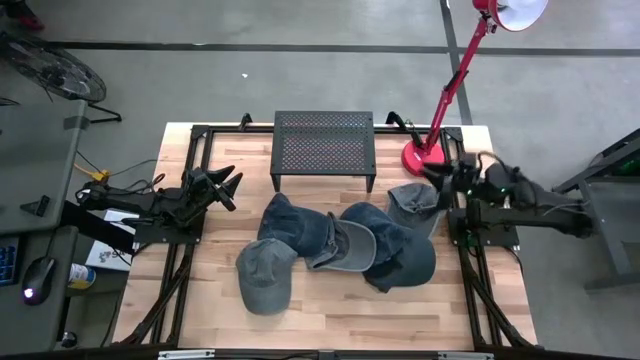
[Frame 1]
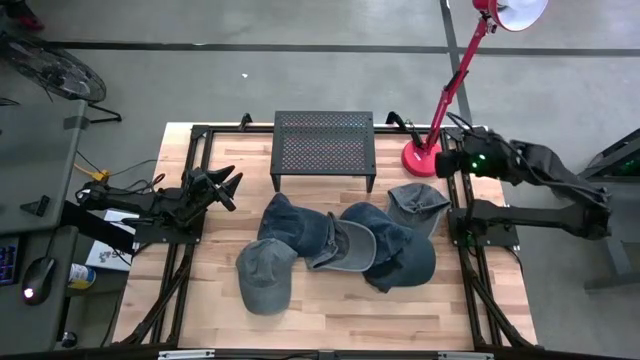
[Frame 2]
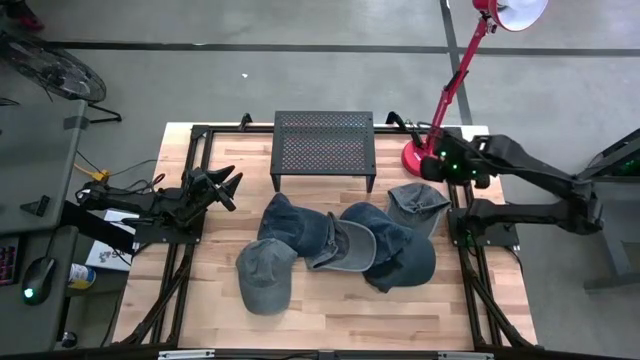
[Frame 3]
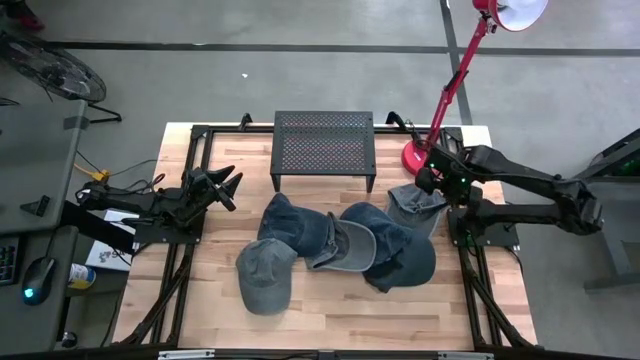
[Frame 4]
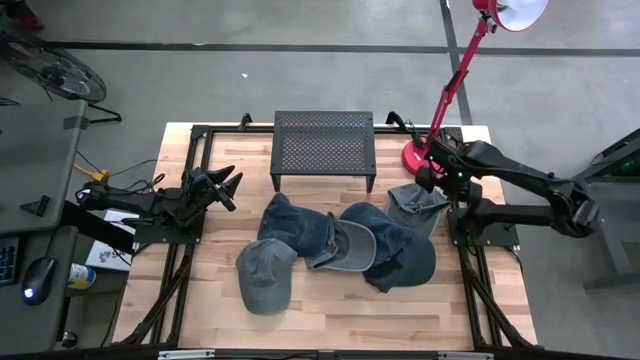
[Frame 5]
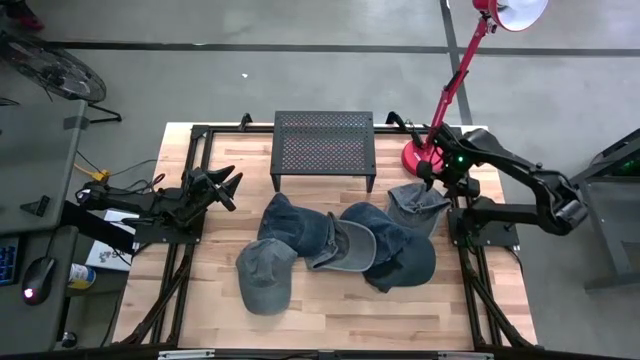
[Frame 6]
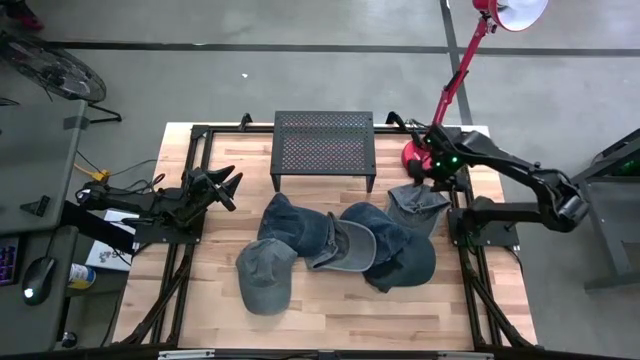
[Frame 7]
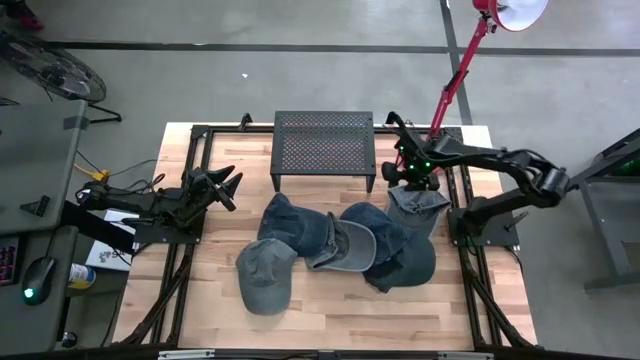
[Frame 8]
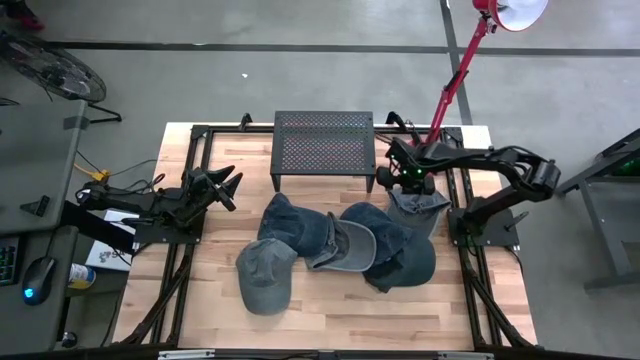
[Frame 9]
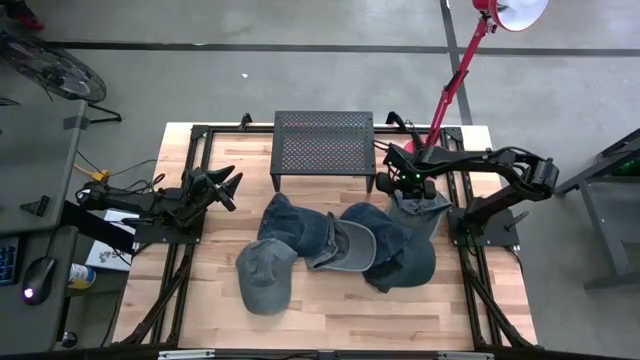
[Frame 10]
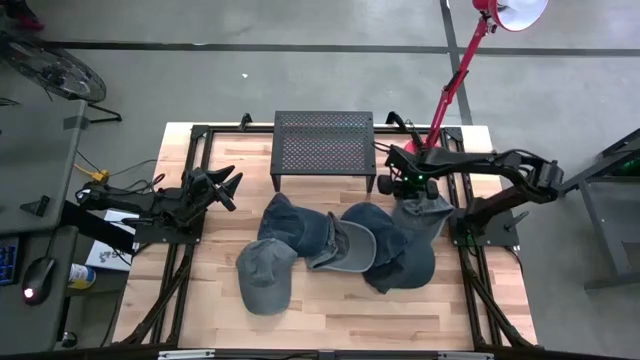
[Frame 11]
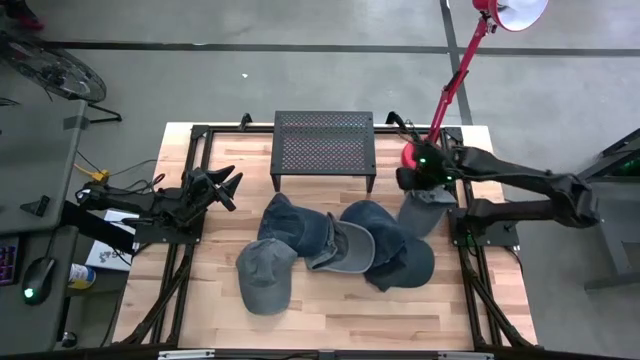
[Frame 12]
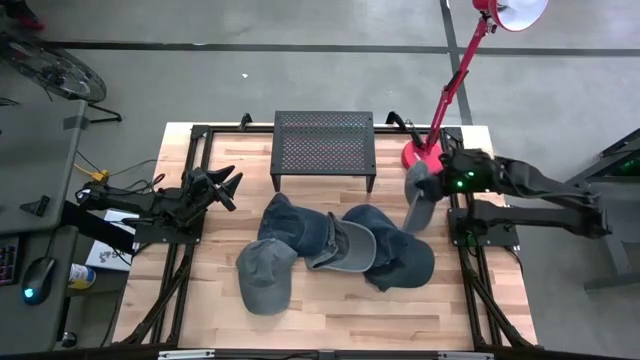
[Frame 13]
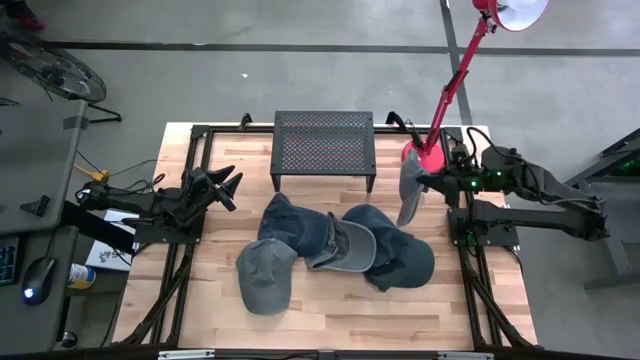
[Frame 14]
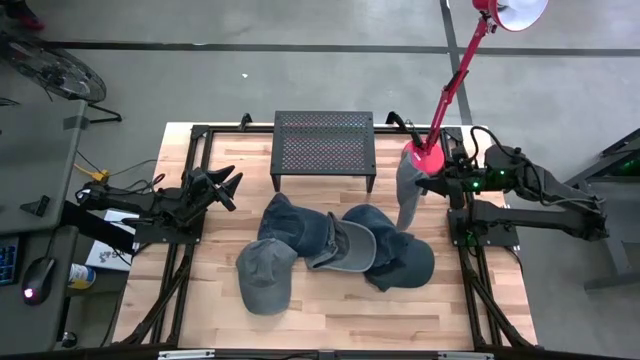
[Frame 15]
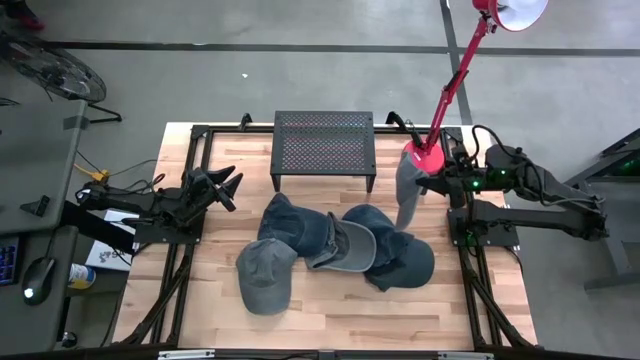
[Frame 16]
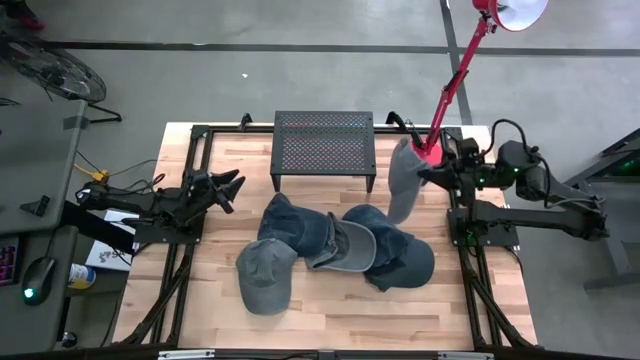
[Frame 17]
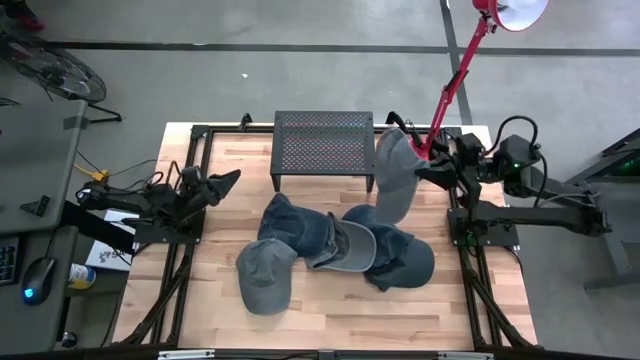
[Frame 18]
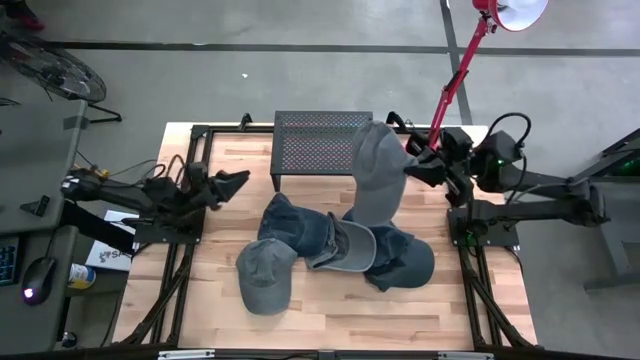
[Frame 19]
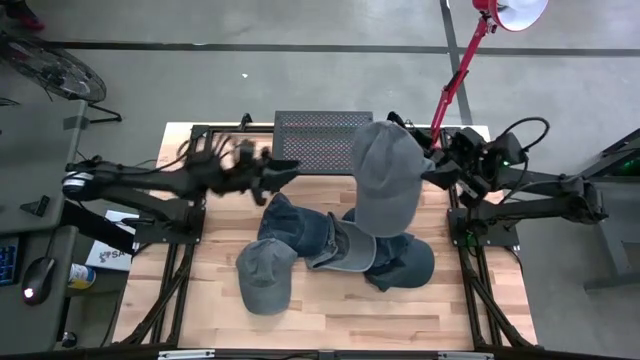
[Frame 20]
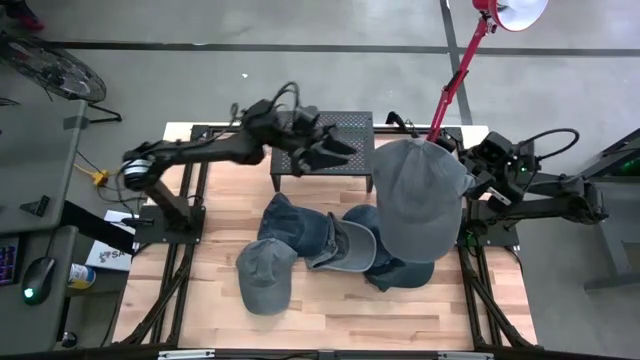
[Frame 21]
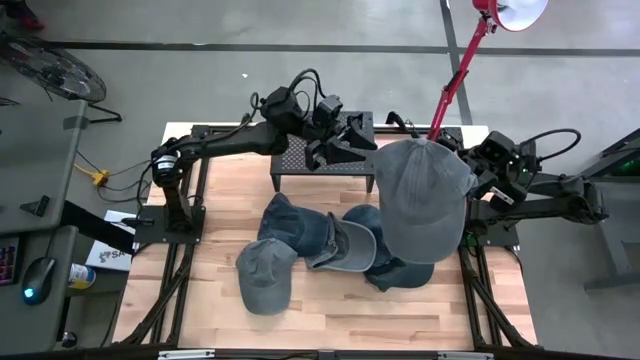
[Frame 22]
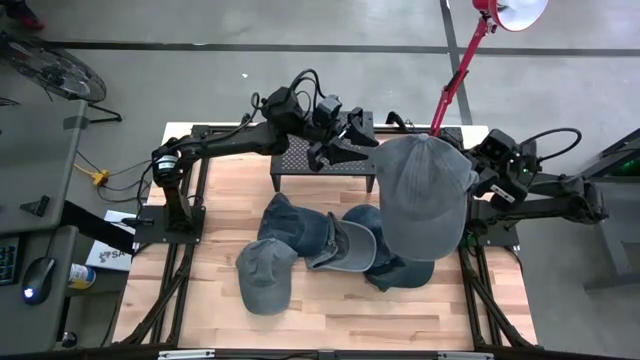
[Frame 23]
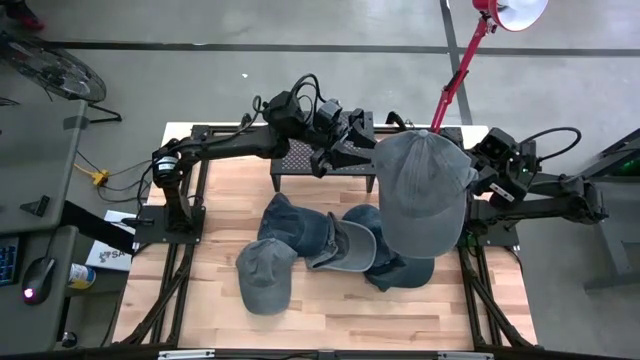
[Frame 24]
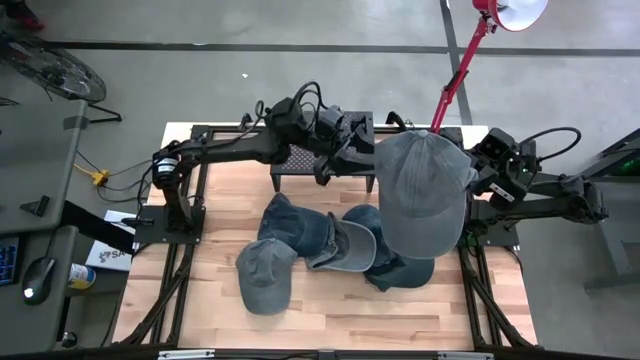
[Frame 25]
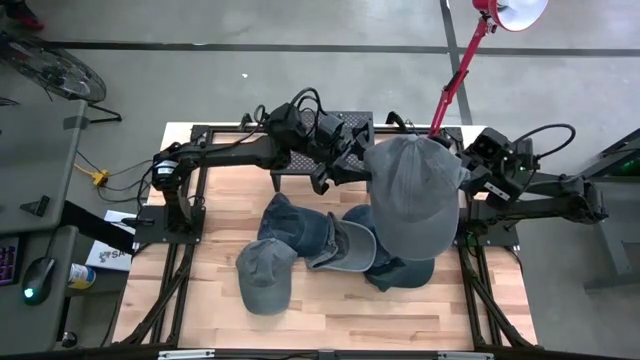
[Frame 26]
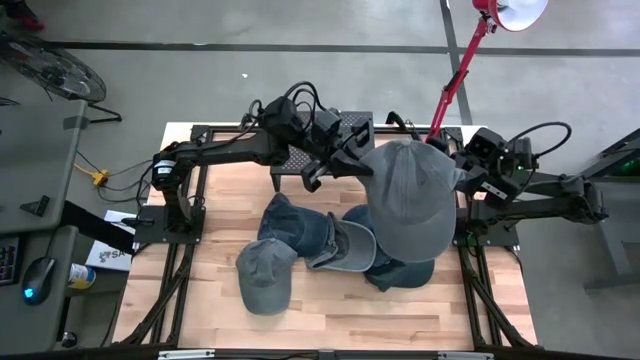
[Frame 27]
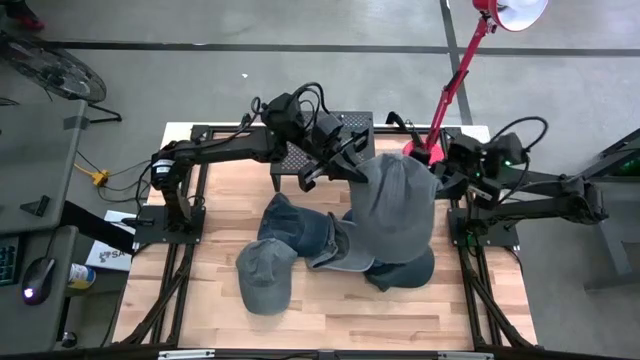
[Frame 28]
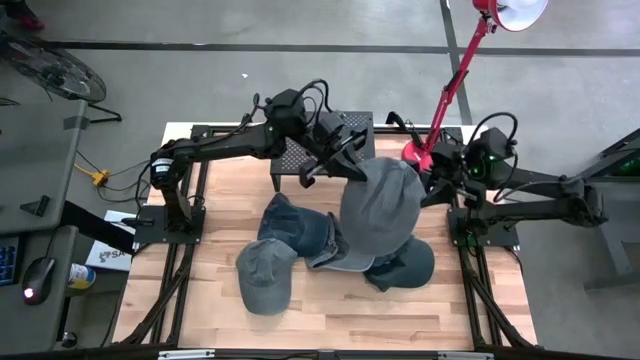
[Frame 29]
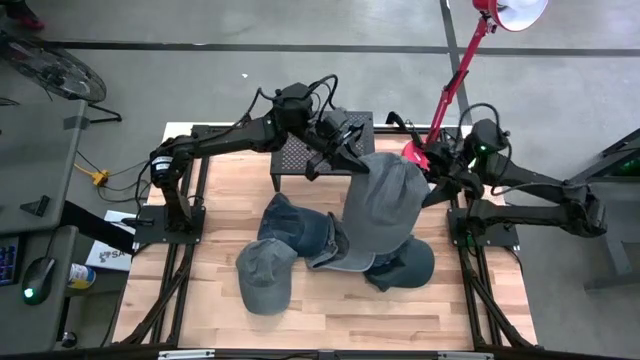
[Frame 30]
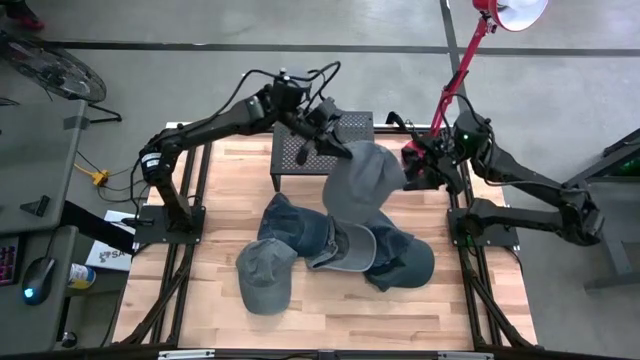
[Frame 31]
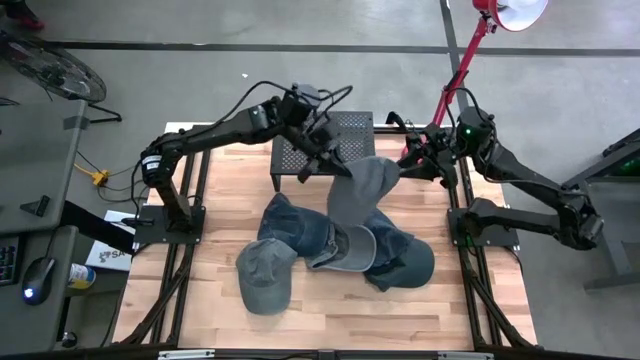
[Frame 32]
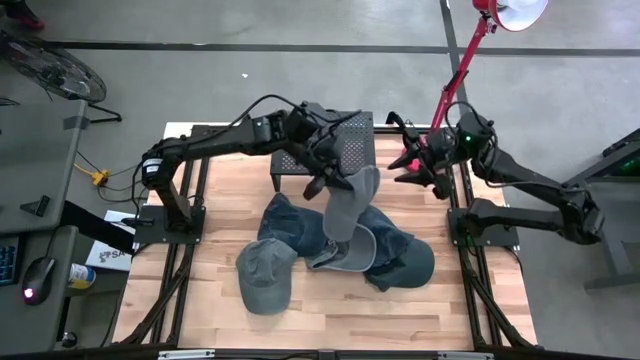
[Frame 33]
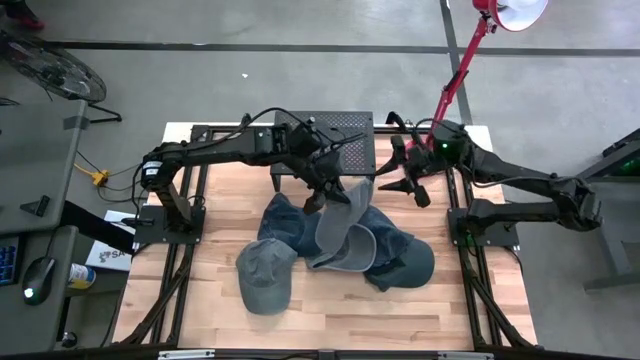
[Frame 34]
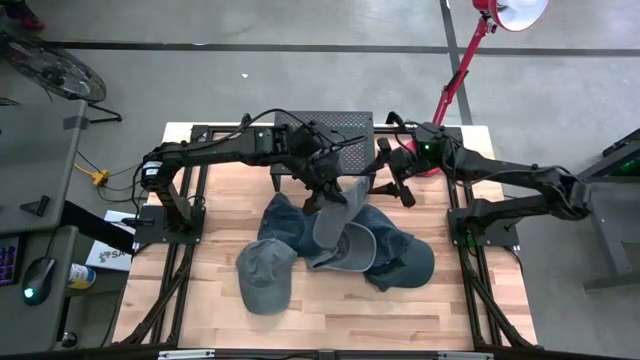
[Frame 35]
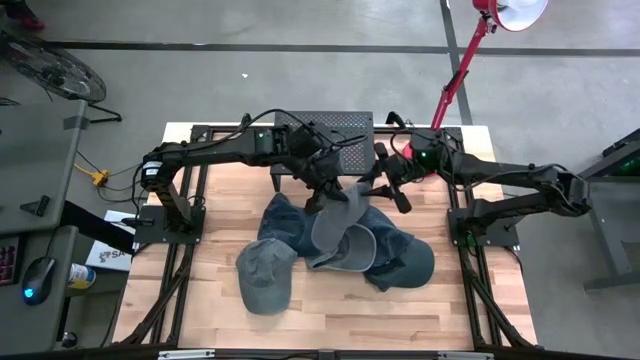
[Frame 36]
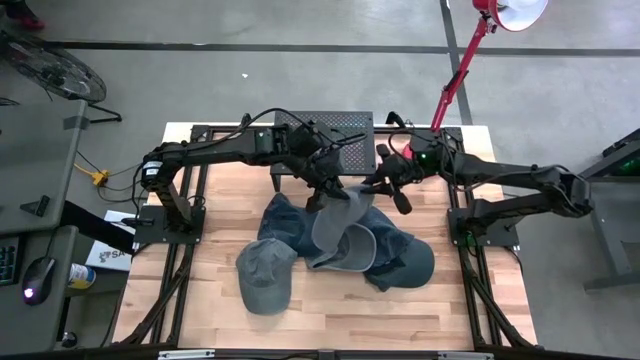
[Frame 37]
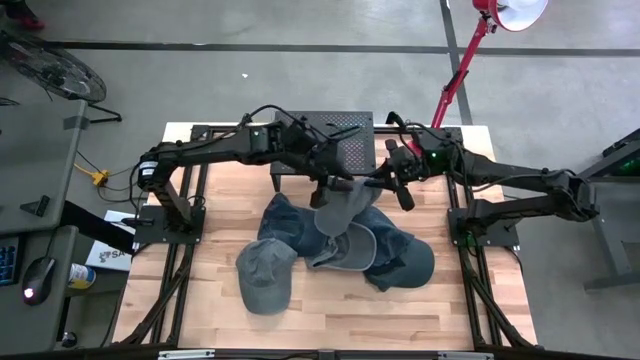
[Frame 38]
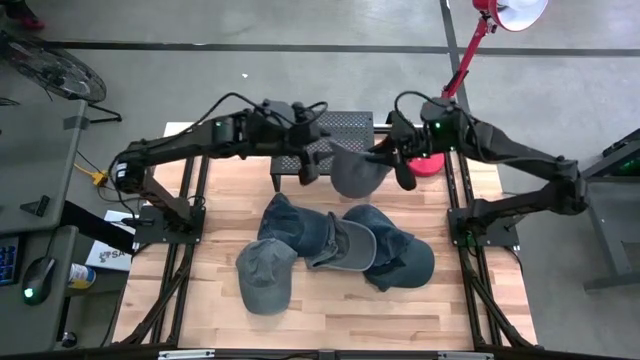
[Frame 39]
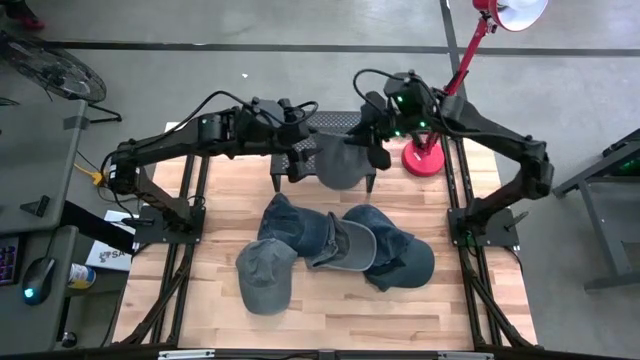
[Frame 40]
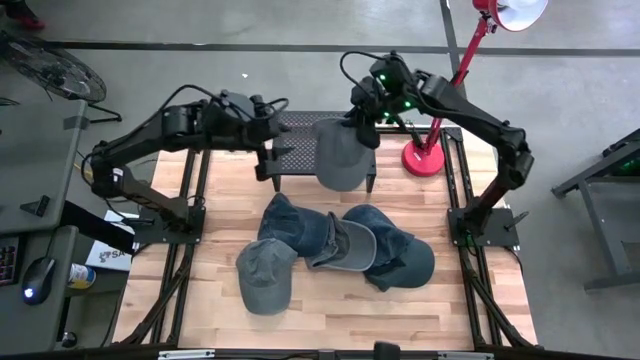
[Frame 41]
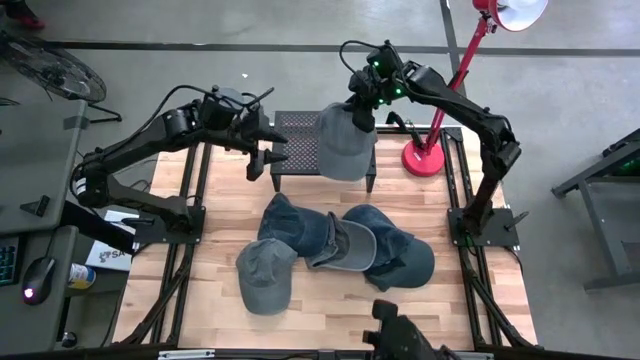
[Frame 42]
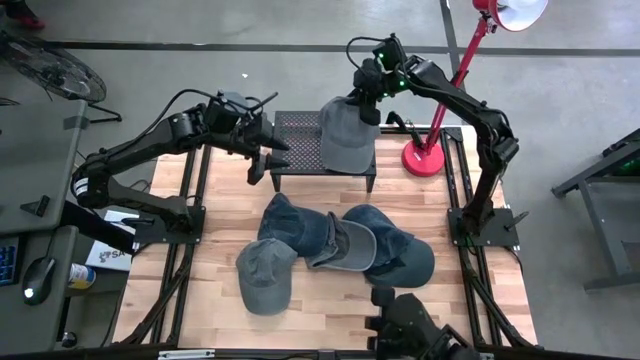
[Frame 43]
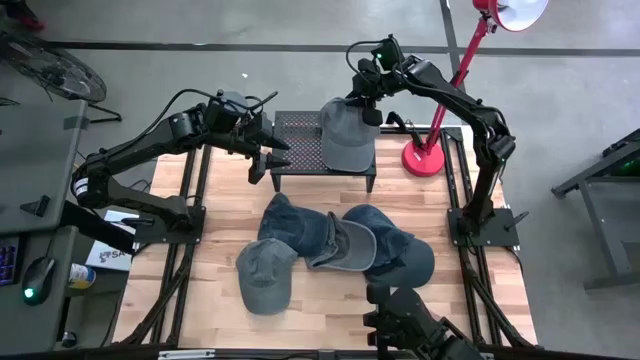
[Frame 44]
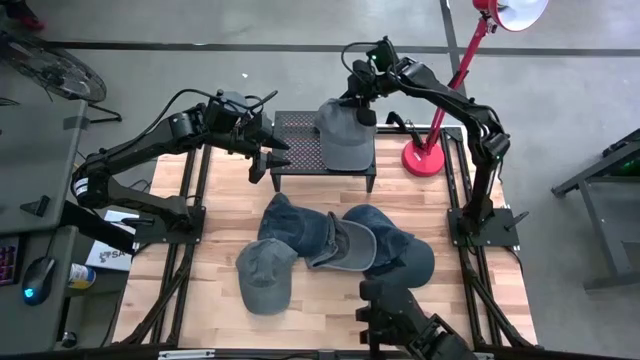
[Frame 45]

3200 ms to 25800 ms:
Task: Pick & Place hat
Put the top gray cap on the shelf
